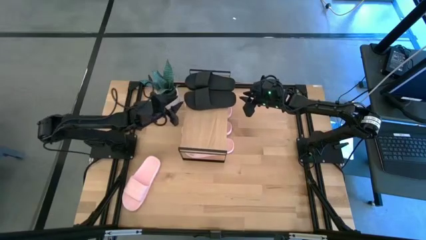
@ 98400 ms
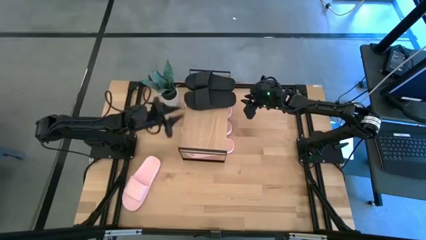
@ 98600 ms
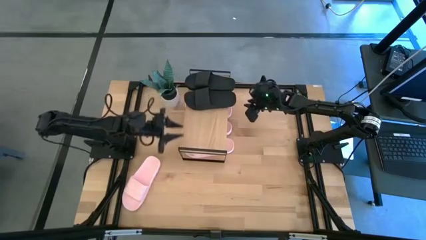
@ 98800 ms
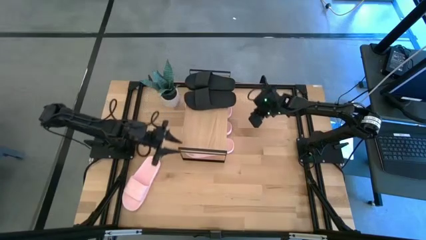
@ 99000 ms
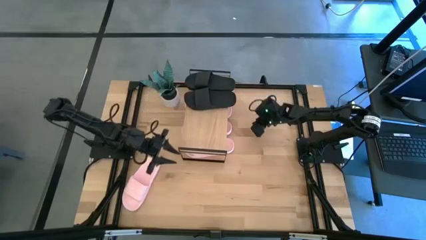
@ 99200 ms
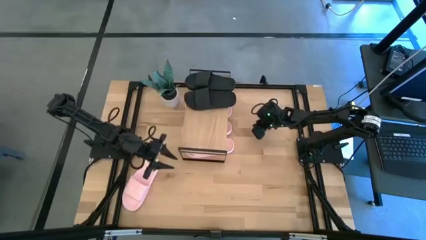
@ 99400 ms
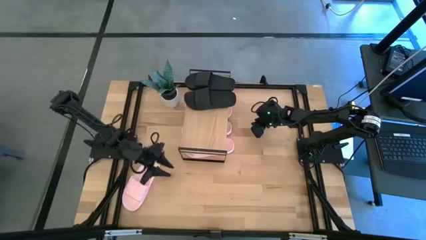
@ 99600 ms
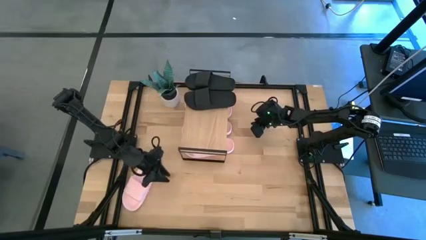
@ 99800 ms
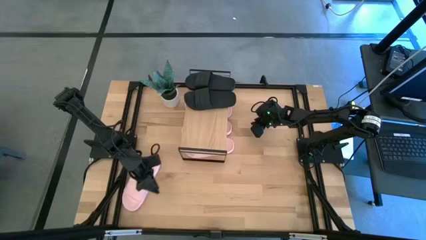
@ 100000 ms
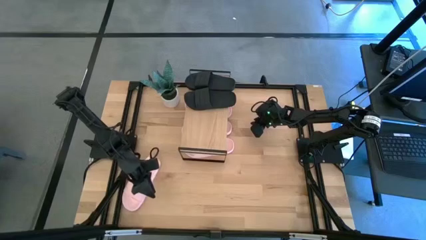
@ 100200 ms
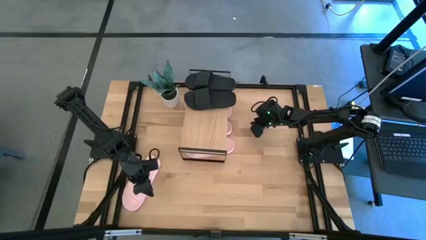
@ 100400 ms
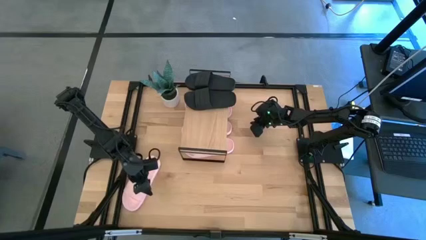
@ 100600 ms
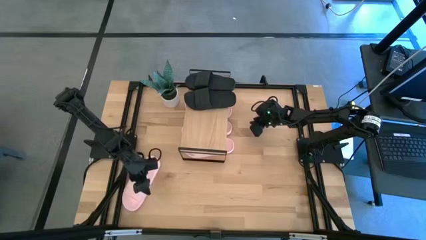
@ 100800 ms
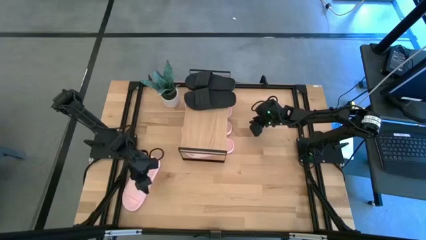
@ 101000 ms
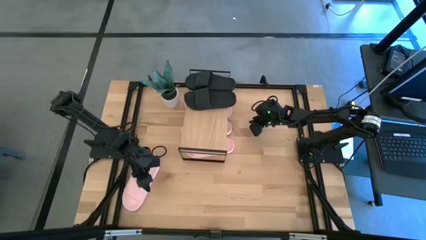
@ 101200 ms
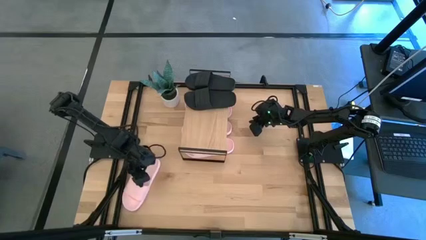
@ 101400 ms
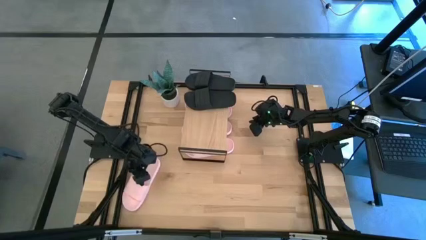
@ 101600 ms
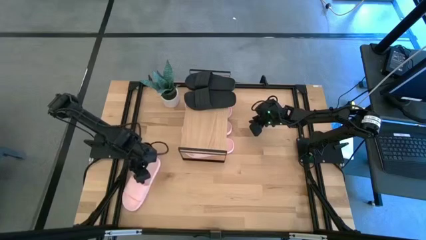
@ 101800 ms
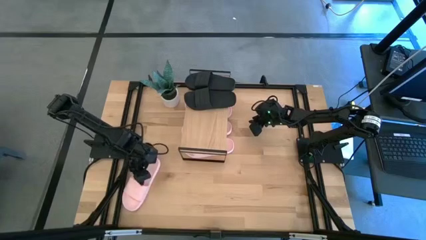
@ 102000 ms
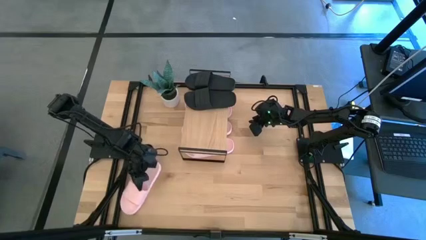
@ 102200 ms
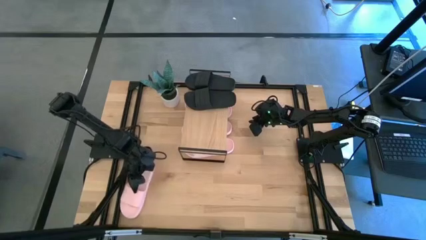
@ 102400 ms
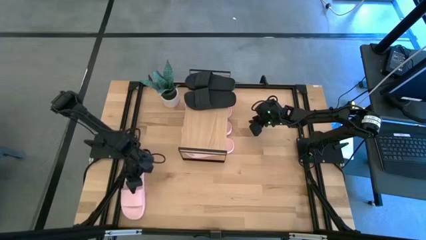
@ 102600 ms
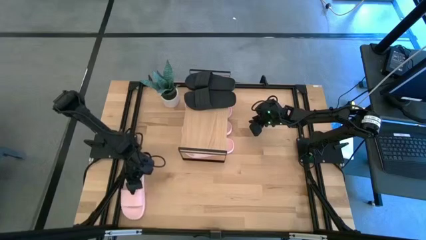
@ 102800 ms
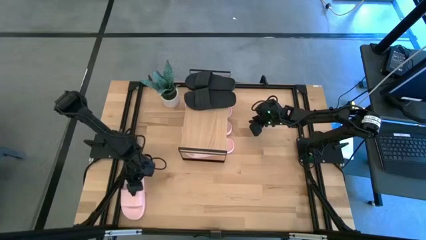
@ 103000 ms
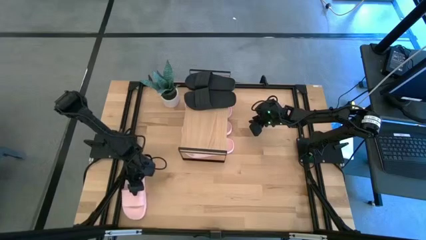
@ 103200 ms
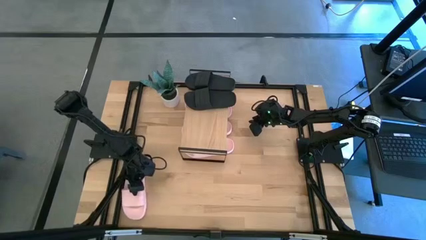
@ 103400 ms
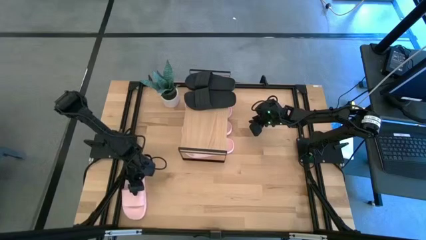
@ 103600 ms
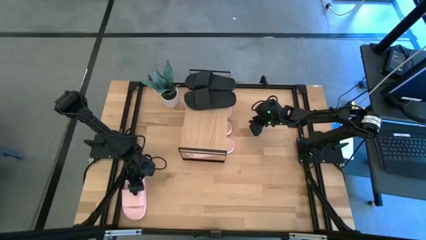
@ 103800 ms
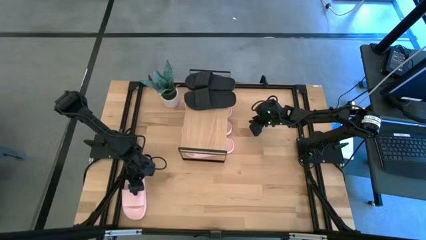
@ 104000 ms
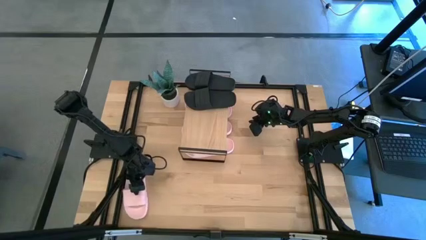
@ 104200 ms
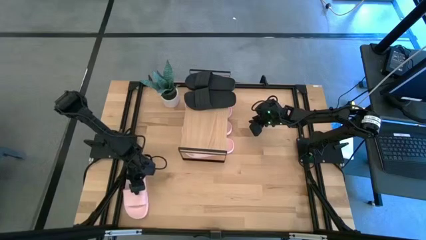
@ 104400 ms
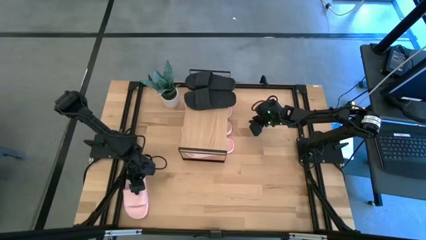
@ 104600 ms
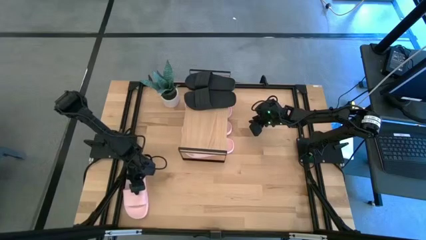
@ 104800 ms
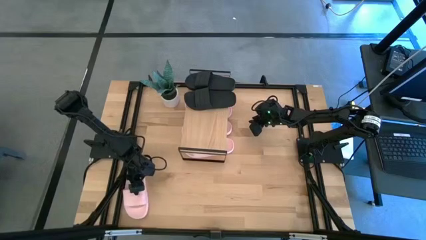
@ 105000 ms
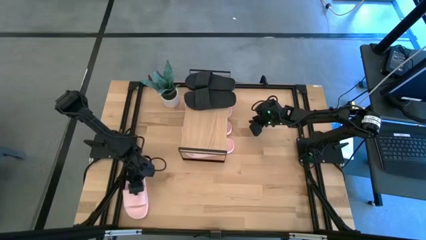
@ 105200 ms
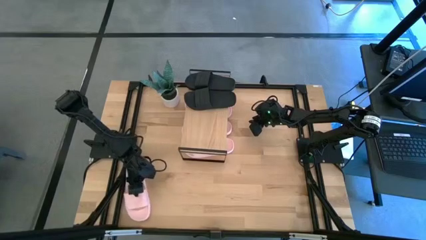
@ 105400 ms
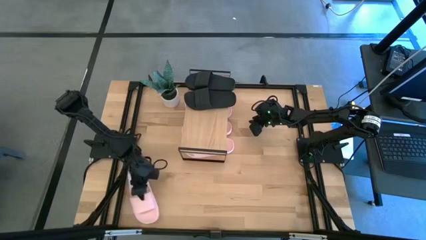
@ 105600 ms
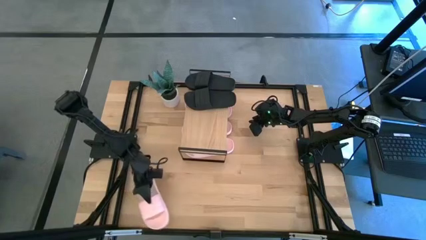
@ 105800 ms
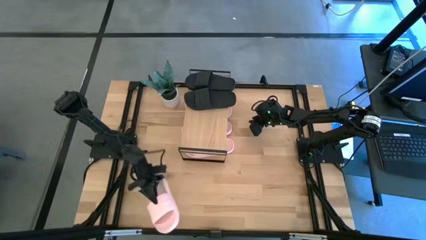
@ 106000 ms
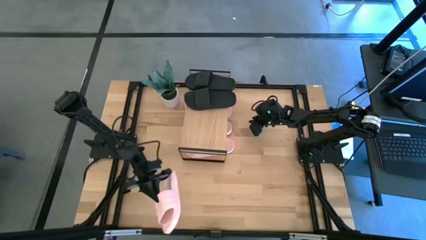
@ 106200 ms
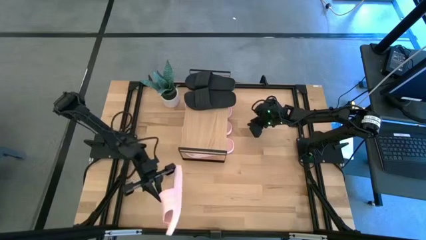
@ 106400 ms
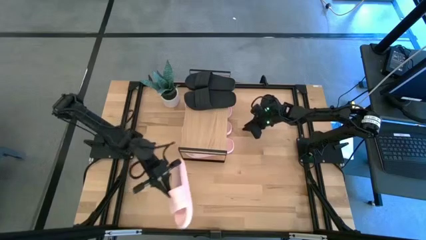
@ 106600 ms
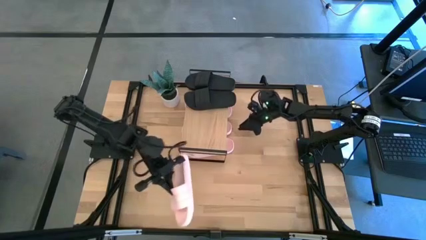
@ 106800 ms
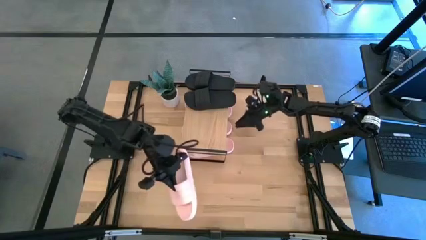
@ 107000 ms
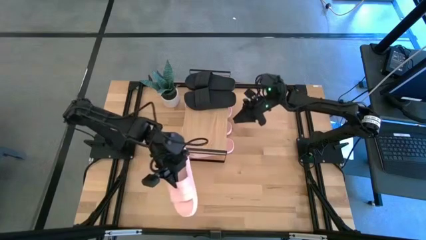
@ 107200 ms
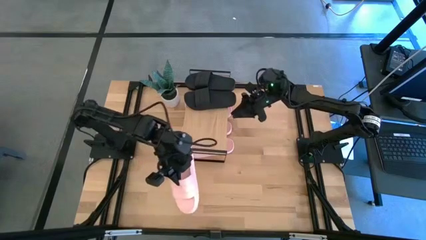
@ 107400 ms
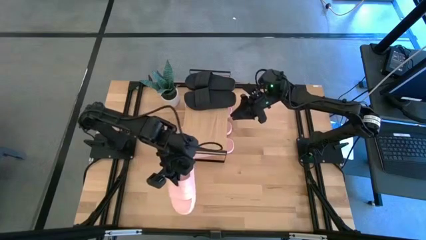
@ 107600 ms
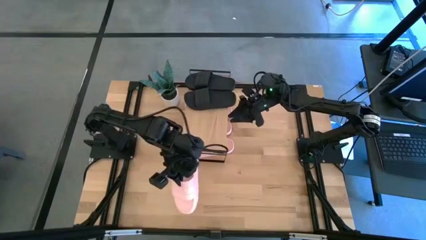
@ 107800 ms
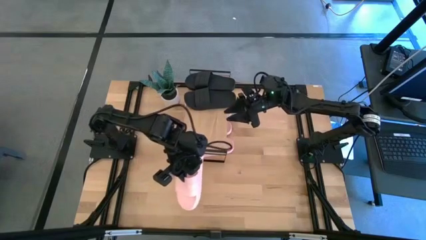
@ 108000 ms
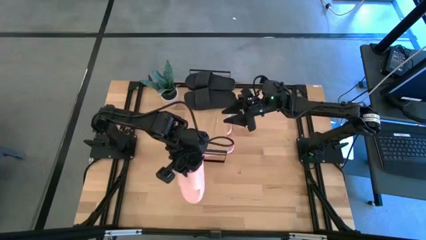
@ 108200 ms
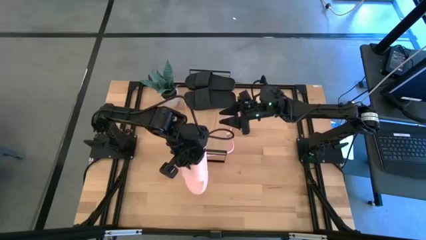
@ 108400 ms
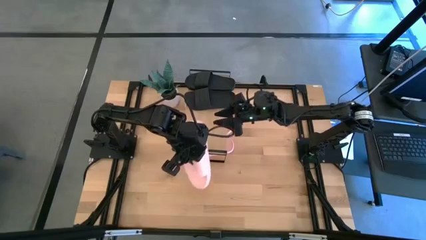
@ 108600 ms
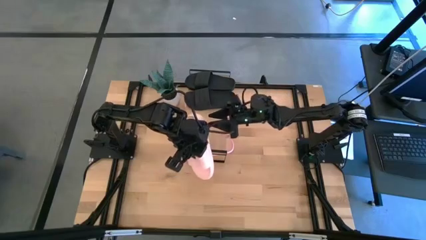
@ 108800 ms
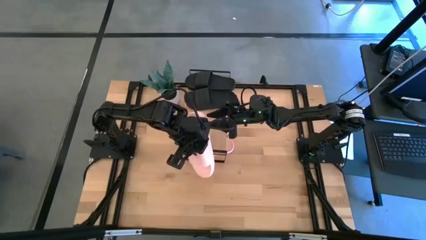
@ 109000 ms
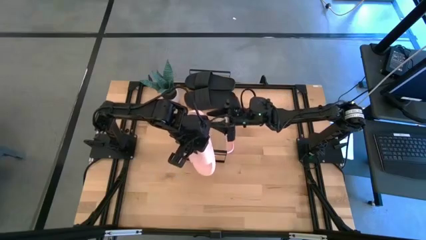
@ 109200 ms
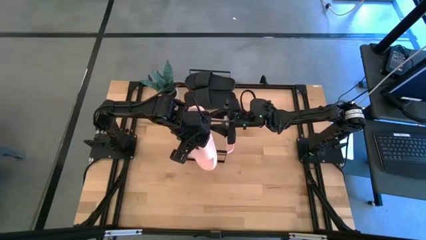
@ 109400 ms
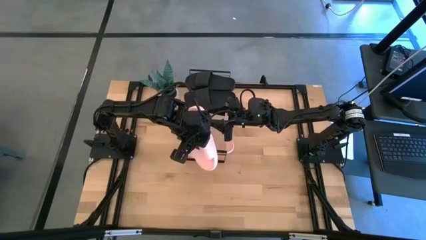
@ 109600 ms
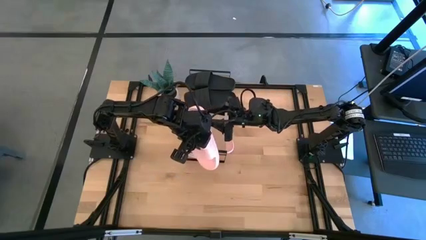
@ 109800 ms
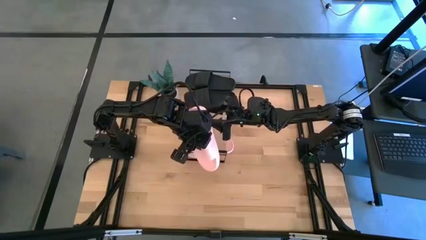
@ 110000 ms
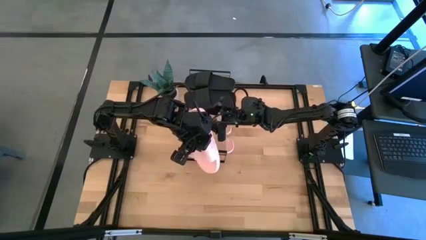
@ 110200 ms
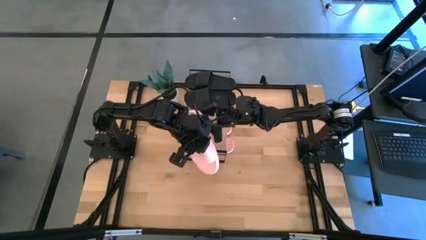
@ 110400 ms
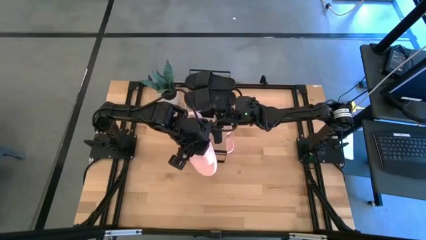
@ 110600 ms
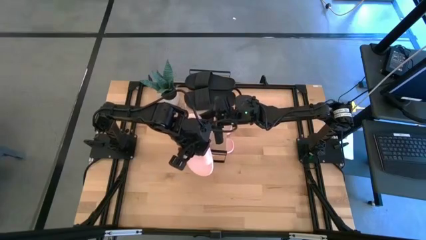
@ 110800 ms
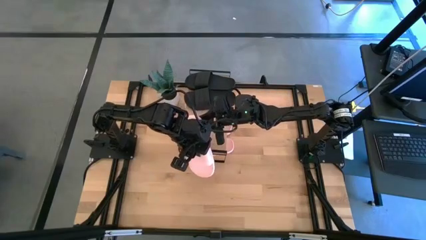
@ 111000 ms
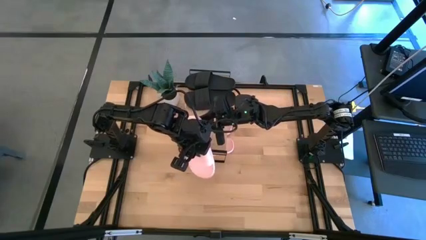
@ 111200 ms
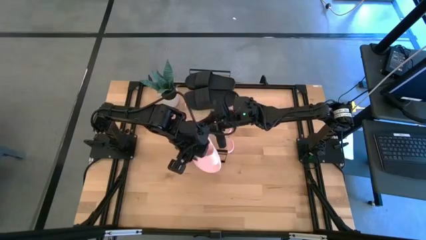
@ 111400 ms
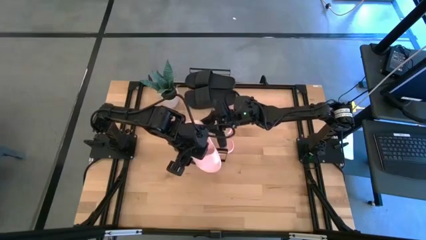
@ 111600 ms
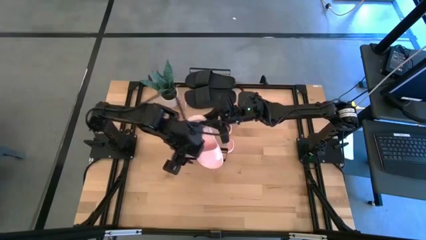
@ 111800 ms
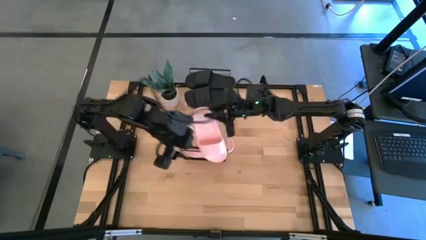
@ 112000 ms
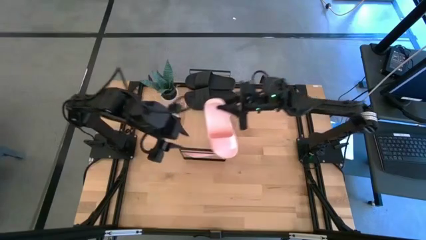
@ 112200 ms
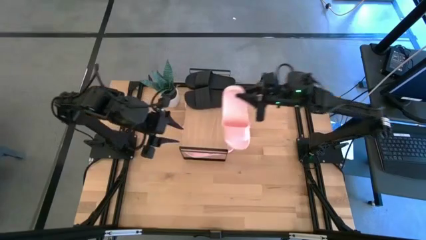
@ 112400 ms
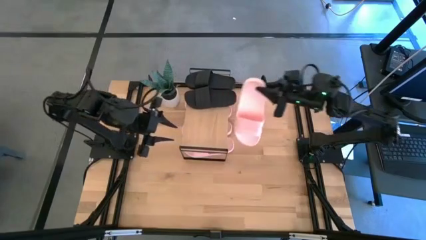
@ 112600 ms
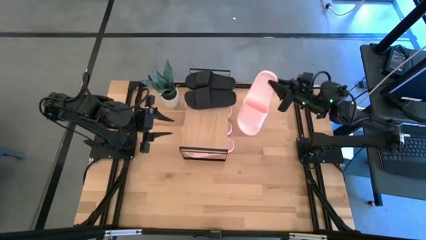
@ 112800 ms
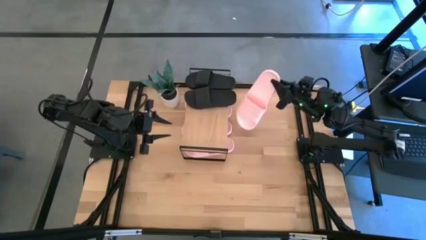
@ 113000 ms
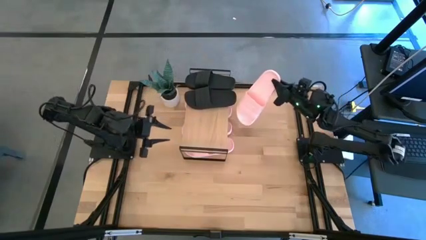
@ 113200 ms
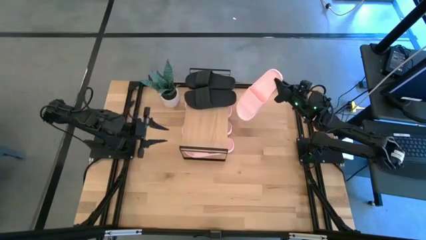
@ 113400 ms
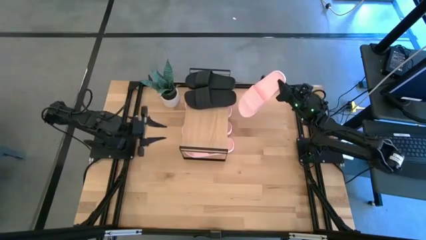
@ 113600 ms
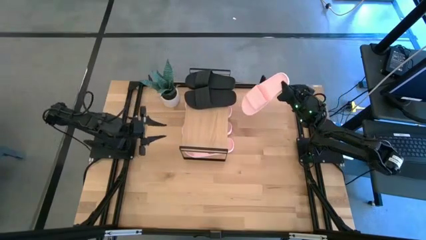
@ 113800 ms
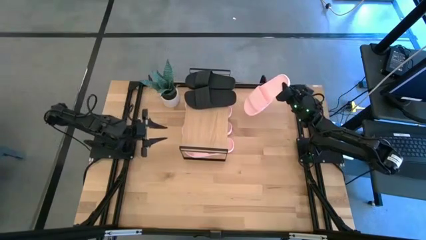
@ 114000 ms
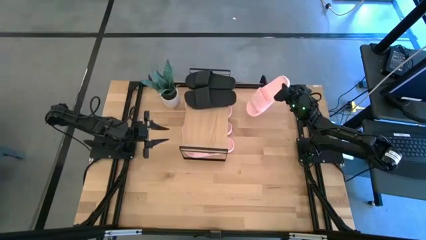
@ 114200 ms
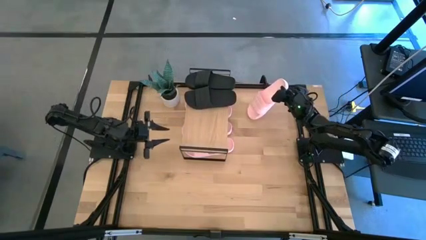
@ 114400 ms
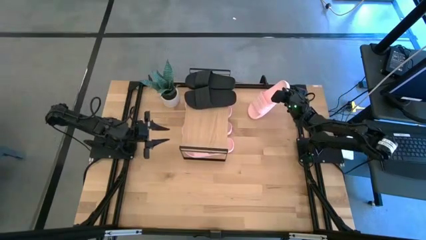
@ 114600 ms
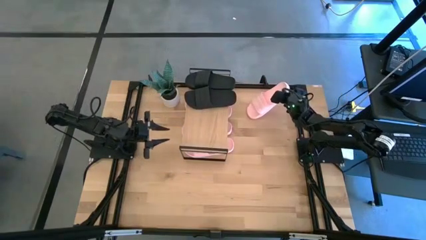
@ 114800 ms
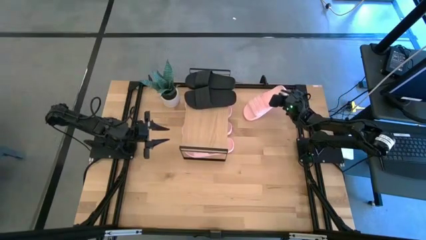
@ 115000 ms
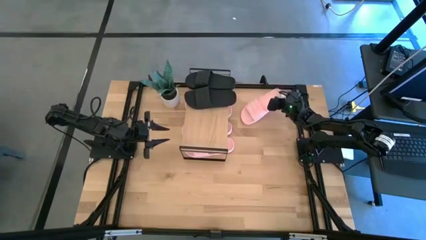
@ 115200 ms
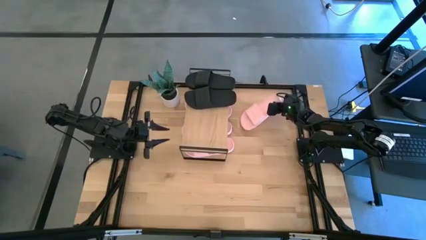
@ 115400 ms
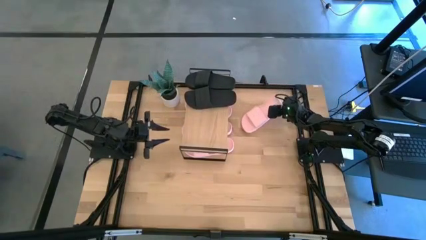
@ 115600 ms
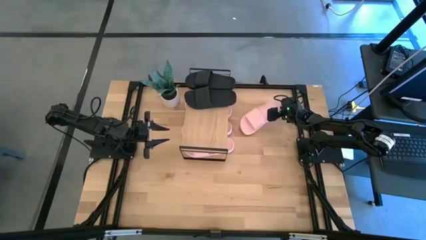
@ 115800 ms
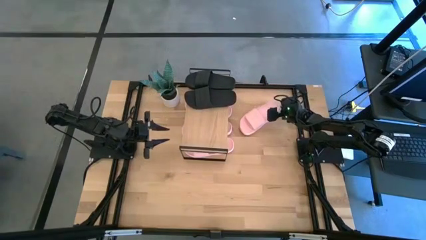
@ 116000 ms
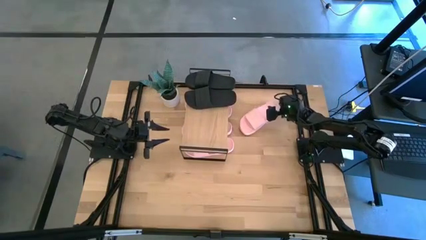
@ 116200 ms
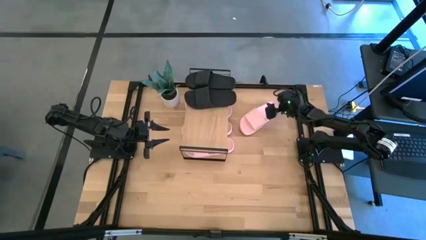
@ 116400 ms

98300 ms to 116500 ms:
Task: Pick and place slides into the shelf
Put the pink slide under the shelf
